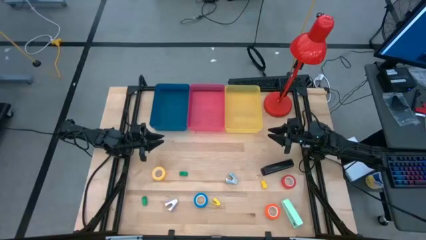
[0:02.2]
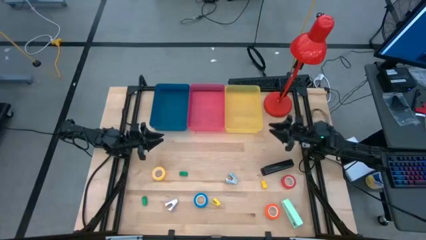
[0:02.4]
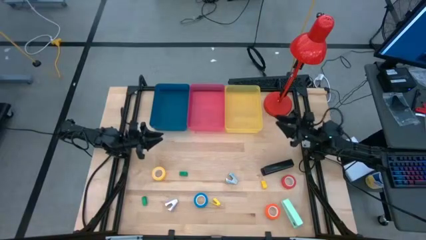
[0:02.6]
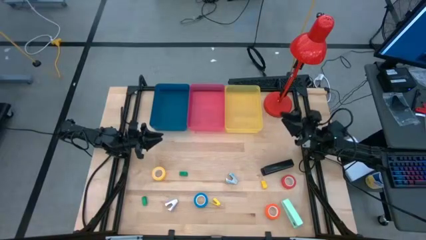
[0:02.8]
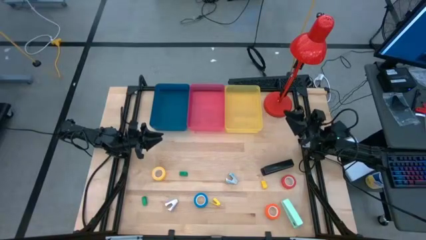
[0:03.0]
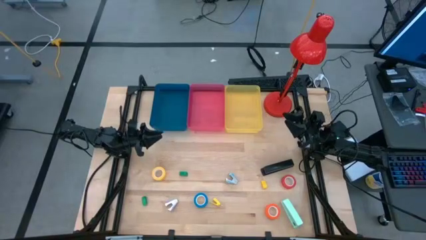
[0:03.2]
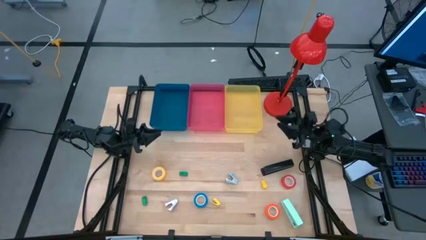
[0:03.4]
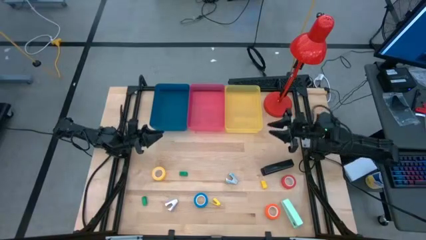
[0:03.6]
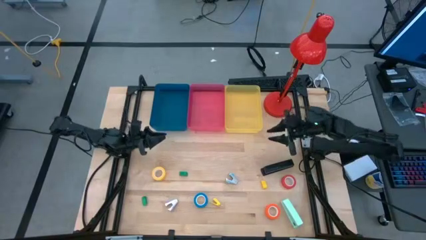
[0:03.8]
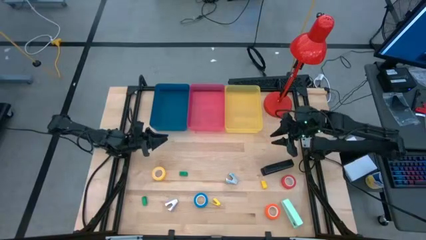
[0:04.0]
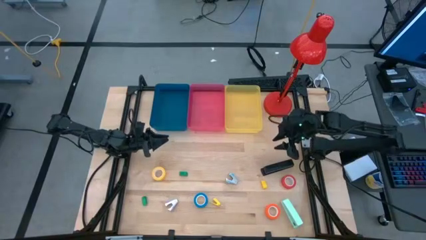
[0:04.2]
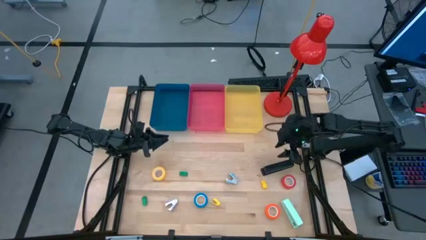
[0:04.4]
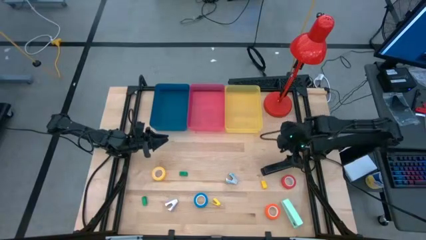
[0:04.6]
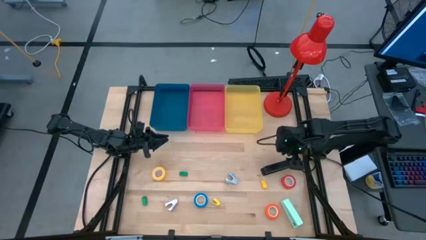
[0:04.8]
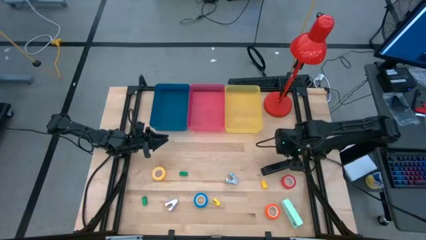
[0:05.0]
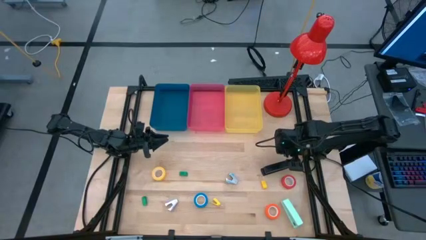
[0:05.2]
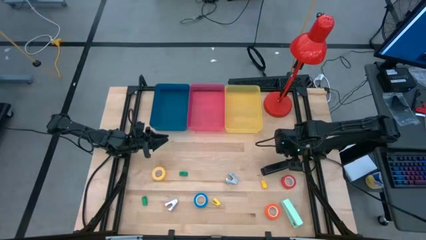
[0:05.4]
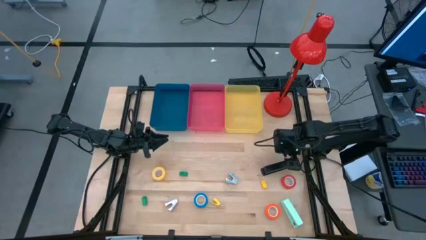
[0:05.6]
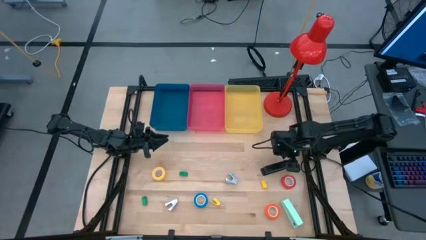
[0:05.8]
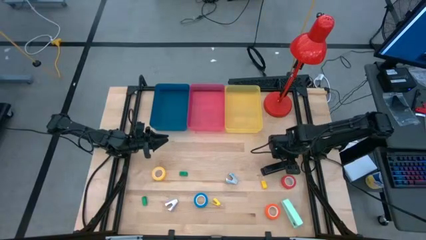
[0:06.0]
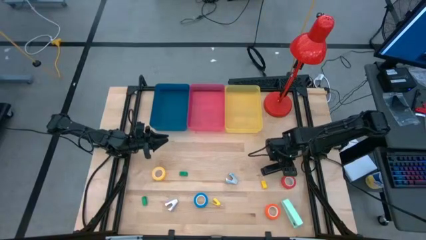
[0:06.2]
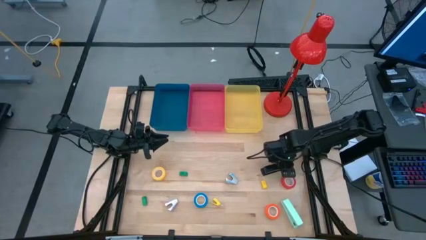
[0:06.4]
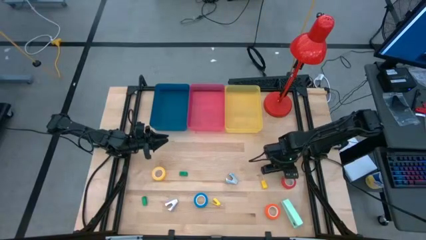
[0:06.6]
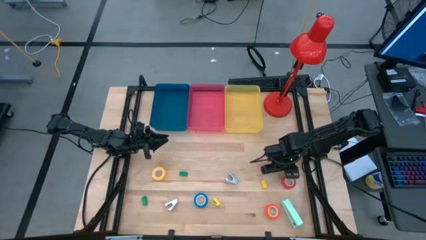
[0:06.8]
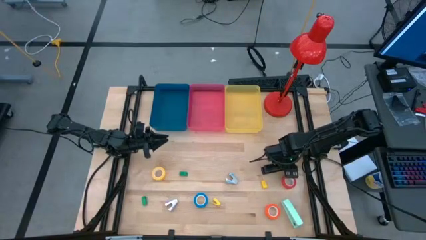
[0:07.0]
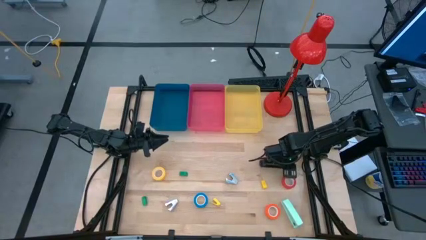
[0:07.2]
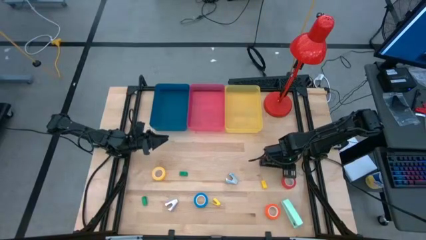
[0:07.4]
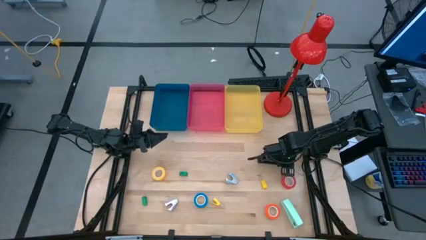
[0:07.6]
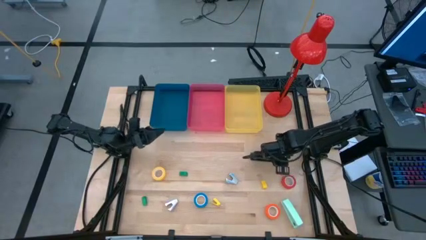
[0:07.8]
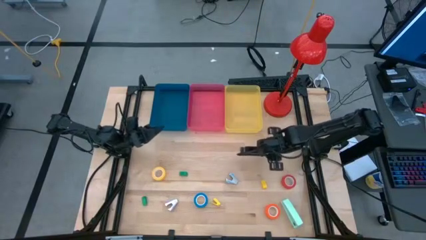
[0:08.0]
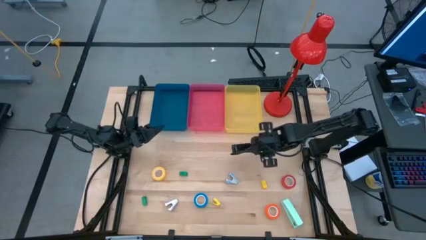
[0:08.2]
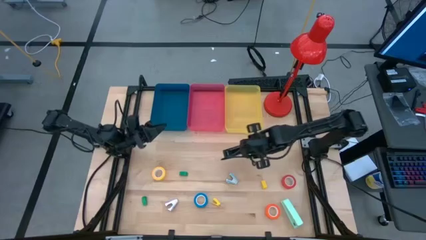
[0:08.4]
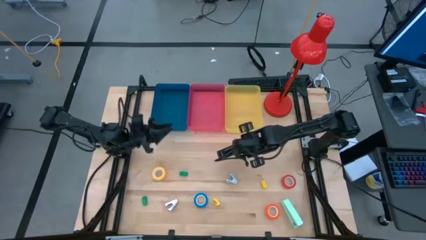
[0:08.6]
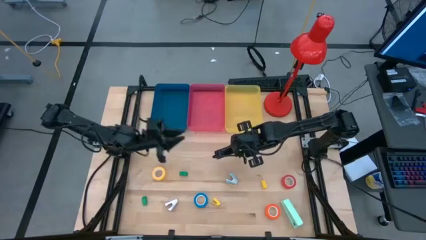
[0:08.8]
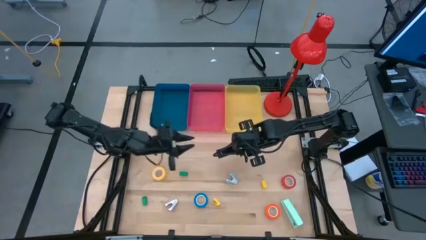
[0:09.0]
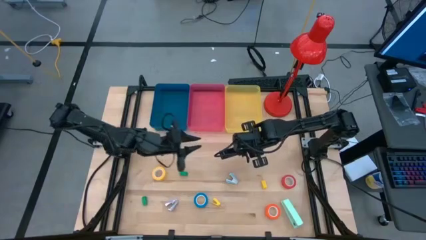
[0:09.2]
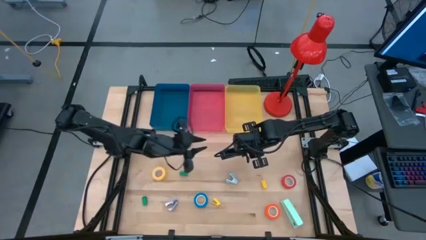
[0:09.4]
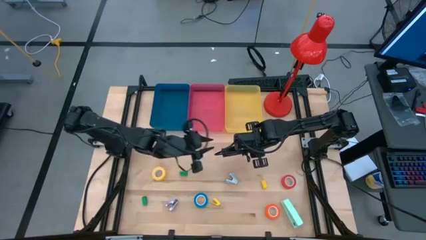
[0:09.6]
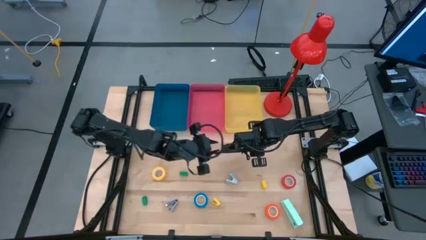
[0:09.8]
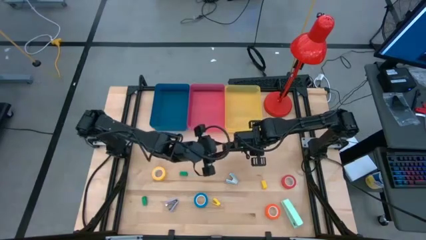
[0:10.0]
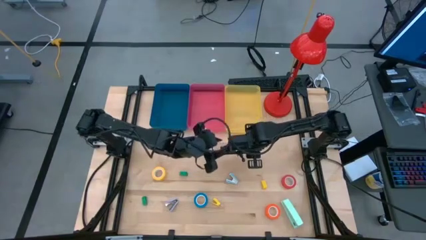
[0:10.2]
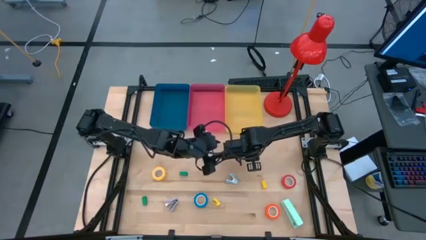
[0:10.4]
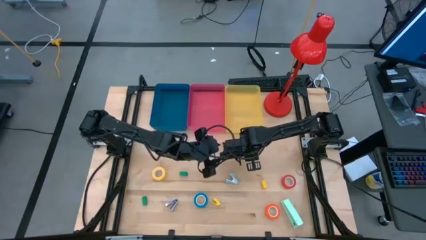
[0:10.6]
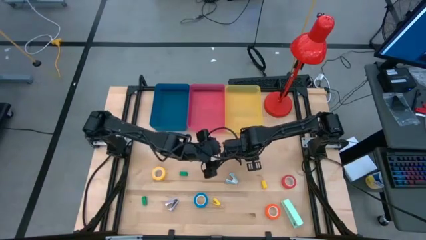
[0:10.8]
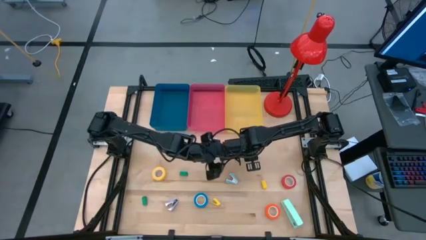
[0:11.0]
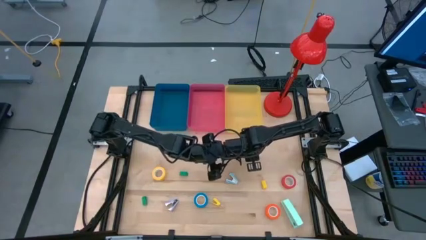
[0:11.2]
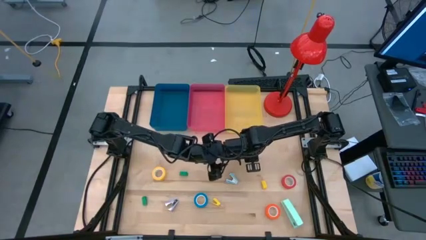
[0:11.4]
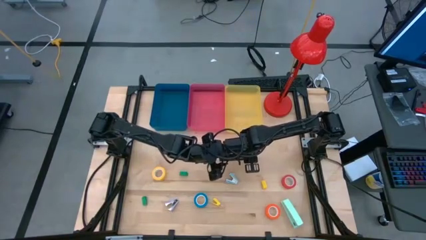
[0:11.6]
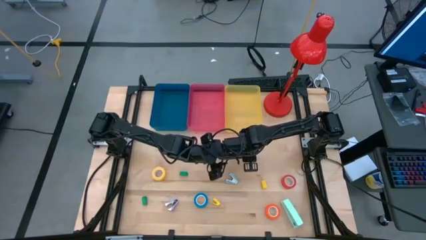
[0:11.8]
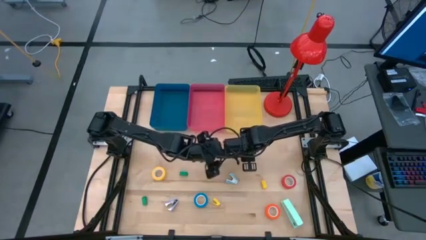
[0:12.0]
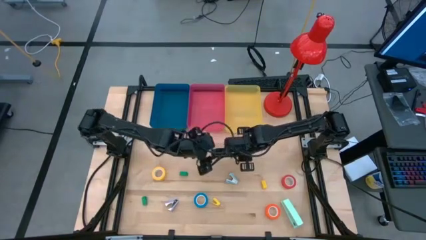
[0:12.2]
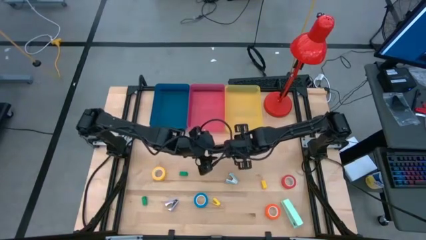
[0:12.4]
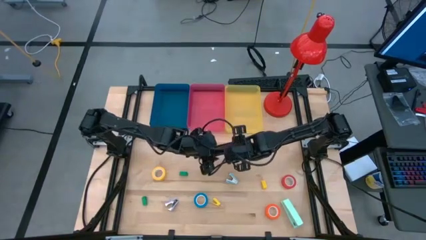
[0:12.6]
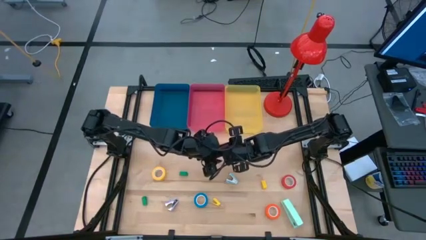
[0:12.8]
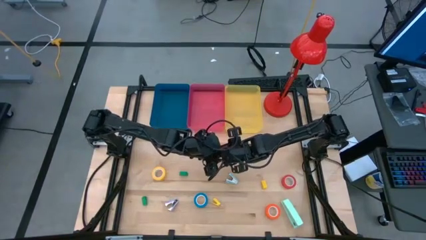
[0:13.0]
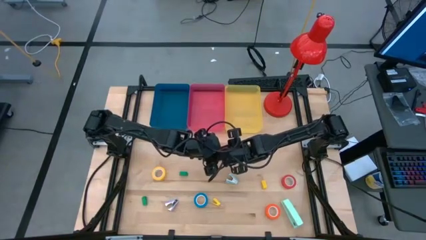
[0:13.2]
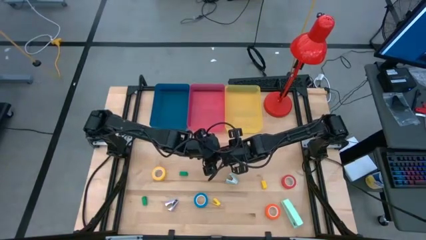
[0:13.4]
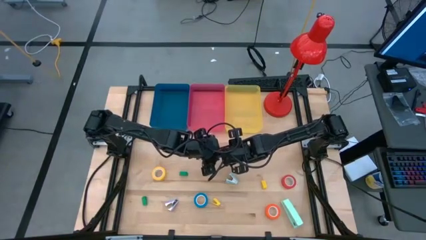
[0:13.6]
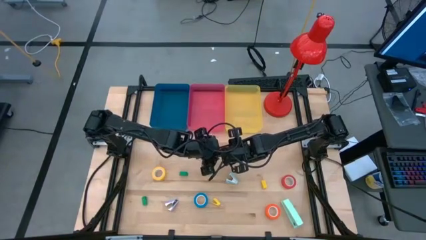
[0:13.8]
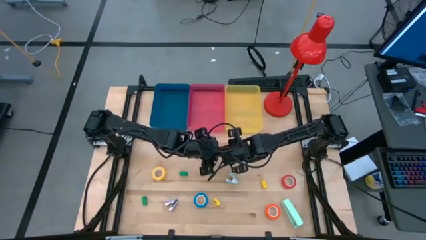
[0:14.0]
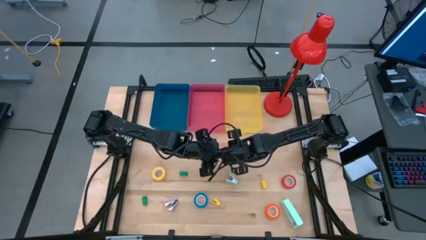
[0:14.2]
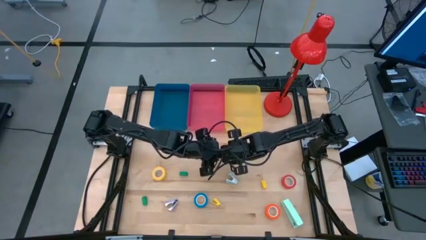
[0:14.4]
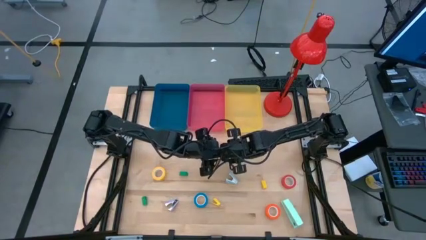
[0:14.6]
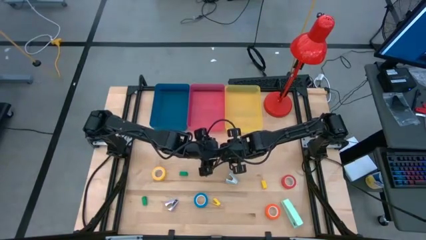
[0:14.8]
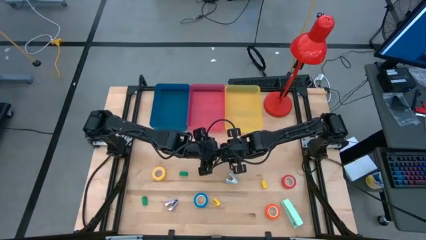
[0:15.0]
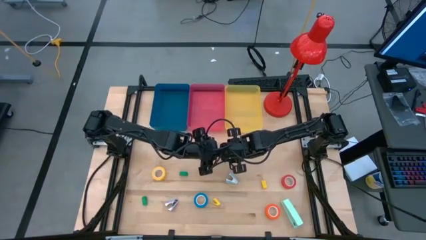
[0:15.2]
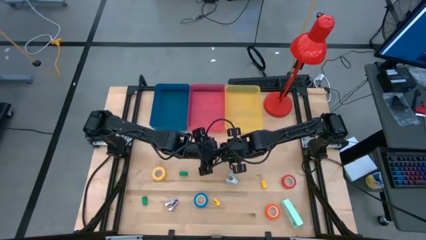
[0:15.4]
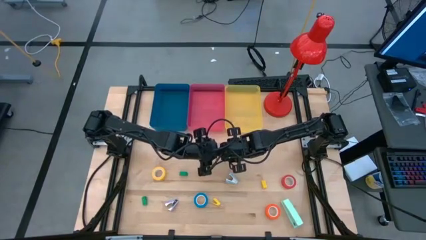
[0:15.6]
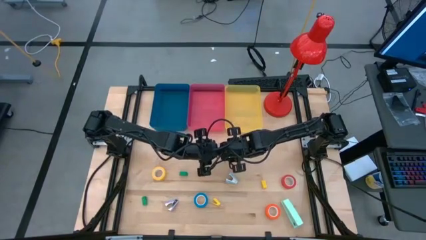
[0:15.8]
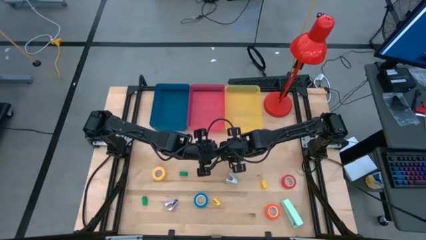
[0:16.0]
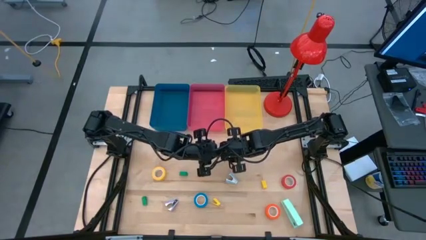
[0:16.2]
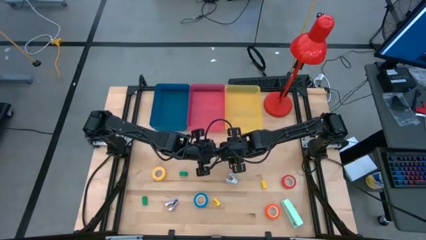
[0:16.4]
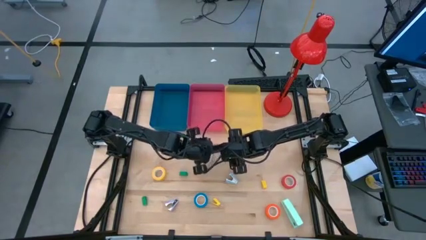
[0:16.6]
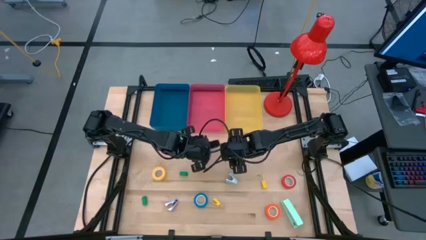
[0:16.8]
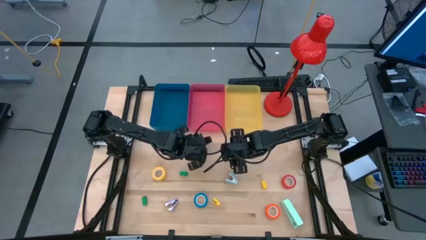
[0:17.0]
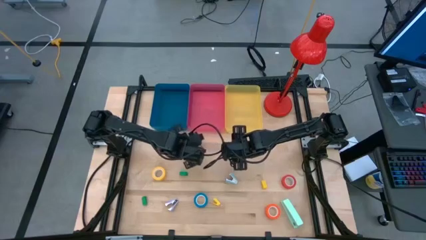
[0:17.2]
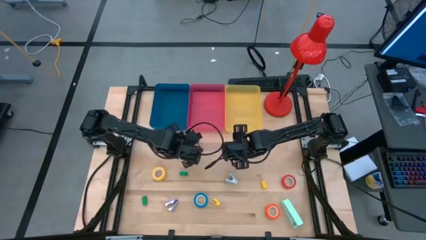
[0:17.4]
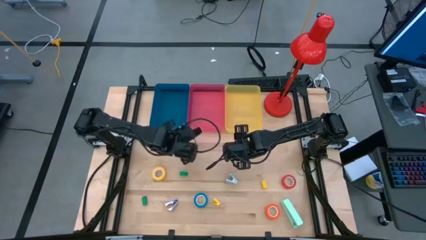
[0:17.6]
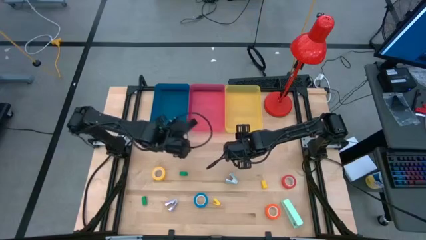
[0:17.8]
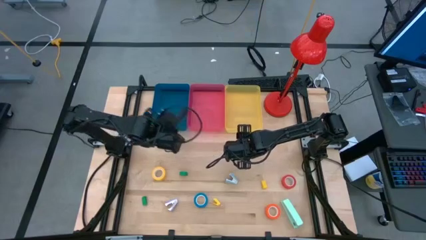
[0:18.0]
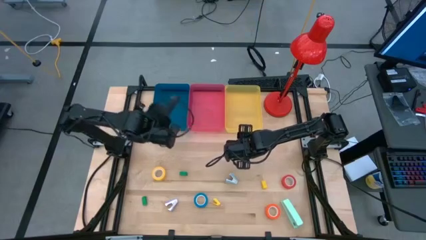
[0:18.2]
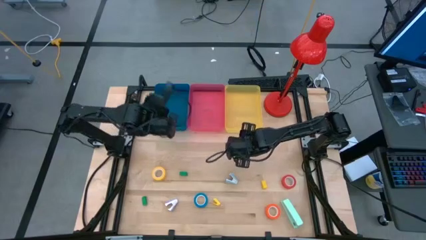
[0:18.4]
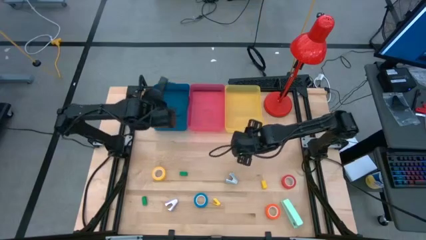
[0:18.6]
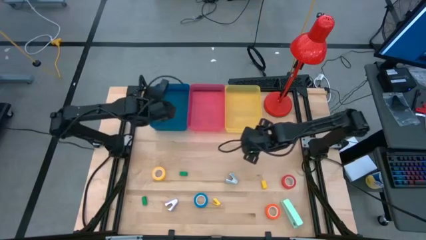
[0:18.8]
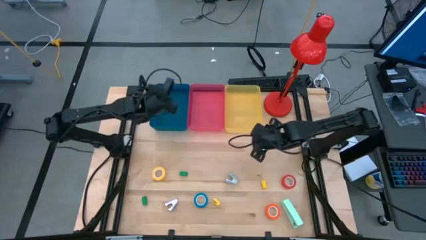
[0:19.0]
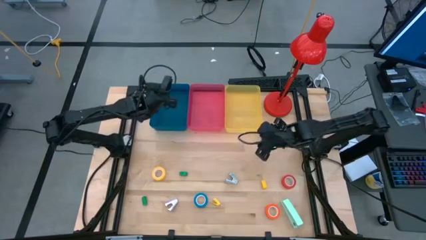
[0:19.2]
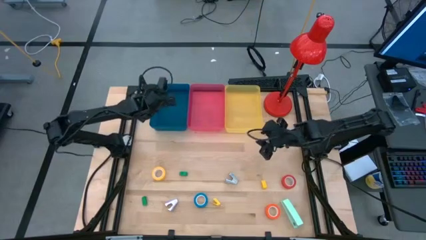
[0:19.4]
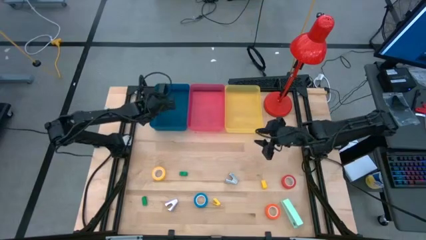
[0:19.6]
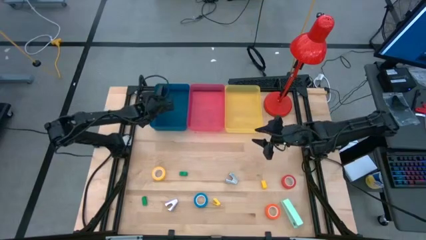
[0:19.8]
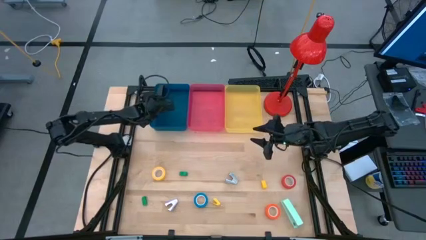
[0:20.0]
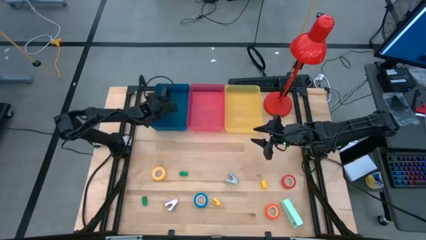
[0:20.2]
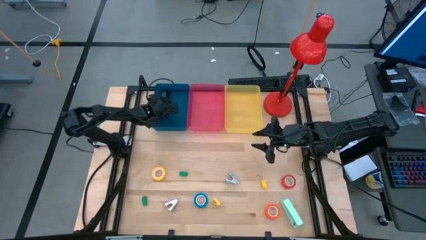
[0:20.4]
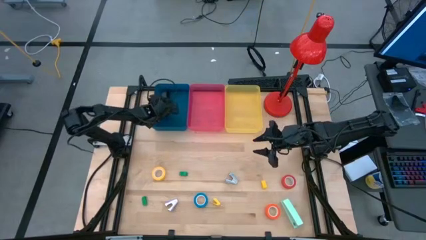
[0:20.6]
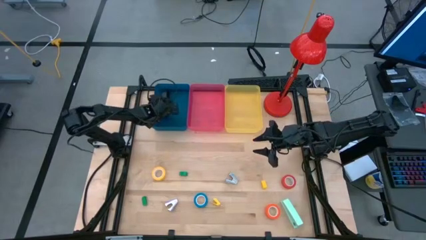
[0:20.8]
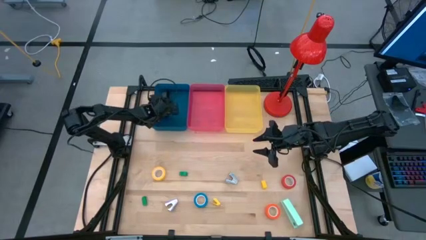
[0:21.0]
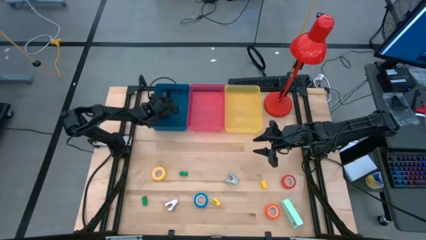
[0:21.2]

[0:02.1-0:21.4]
Task: Pick and place Stapler, Stapler remover, tape
Put the black stapler into the blue bin
